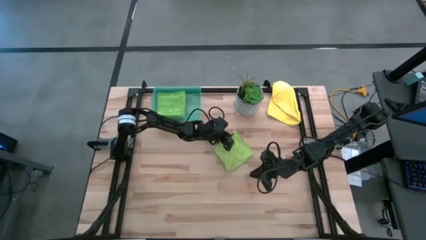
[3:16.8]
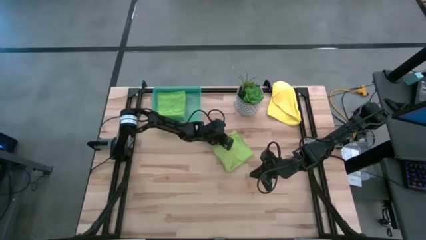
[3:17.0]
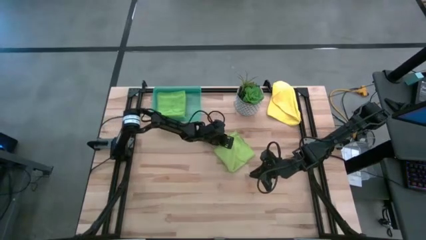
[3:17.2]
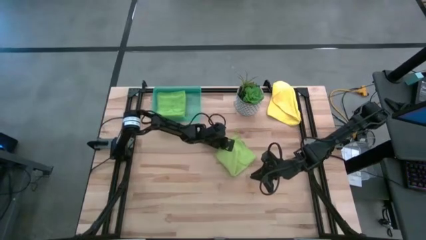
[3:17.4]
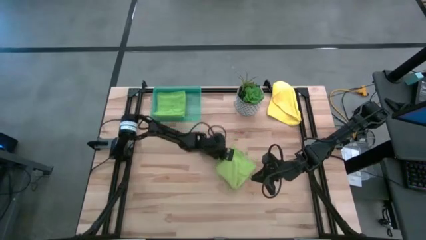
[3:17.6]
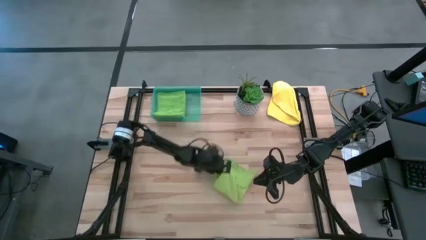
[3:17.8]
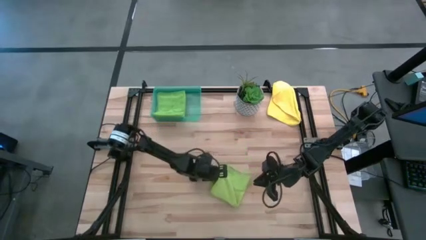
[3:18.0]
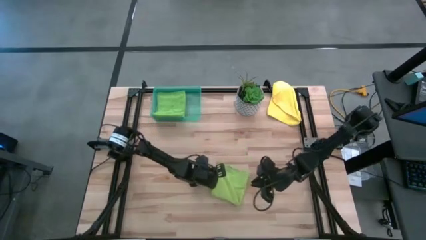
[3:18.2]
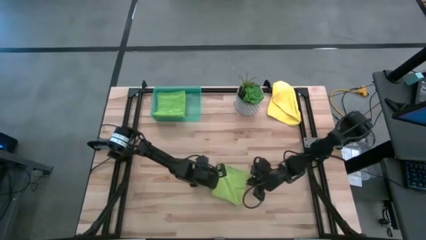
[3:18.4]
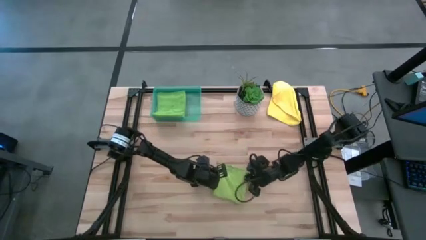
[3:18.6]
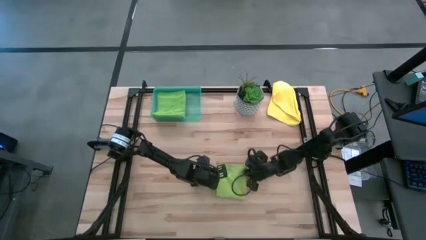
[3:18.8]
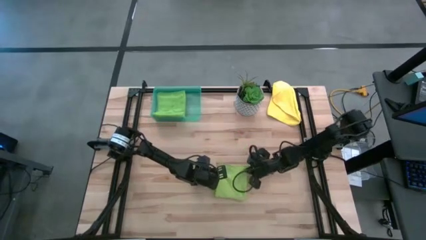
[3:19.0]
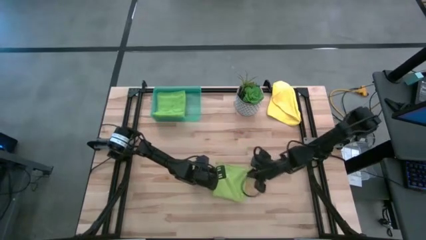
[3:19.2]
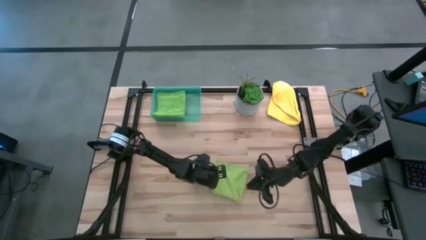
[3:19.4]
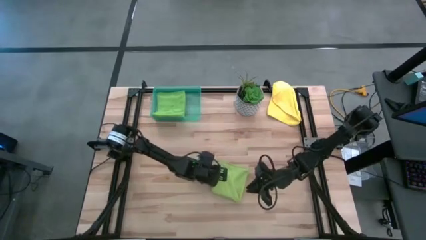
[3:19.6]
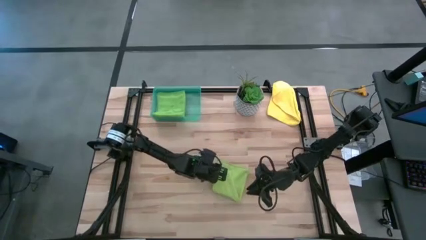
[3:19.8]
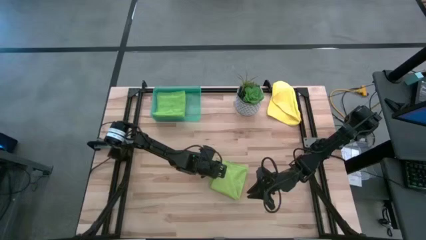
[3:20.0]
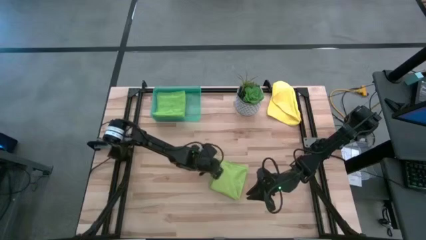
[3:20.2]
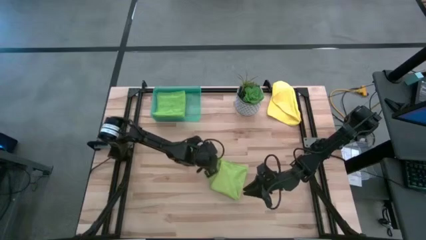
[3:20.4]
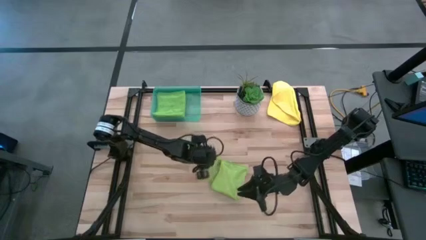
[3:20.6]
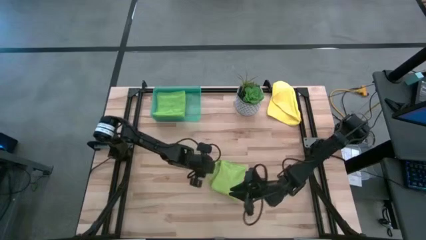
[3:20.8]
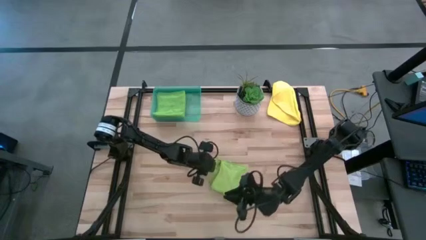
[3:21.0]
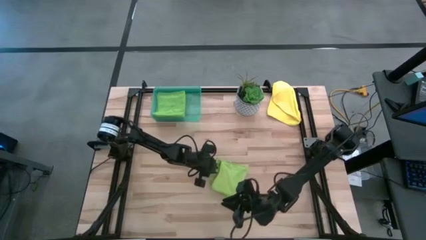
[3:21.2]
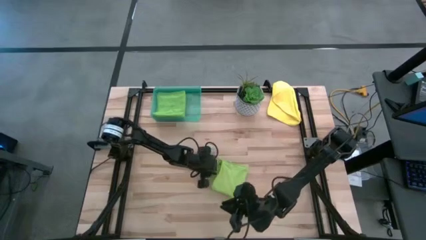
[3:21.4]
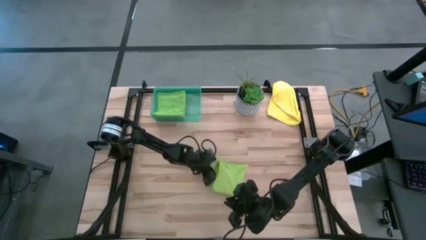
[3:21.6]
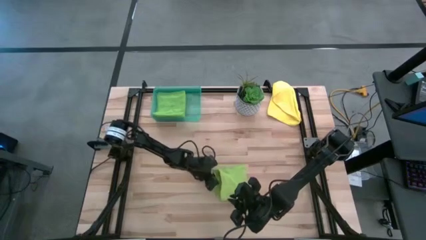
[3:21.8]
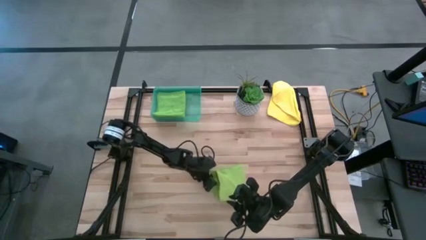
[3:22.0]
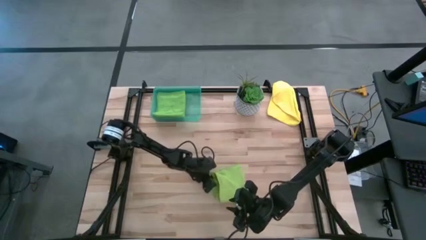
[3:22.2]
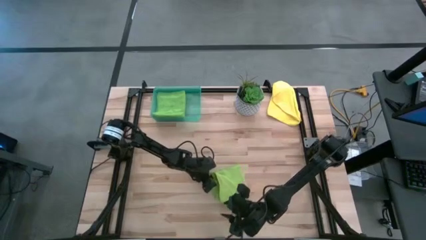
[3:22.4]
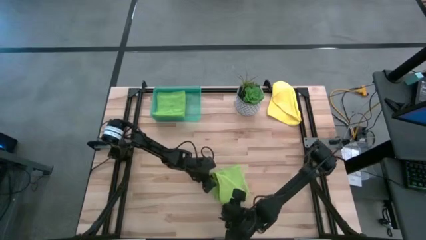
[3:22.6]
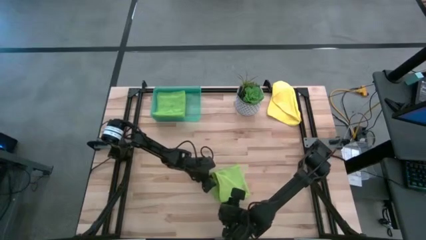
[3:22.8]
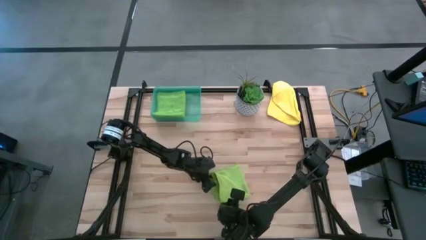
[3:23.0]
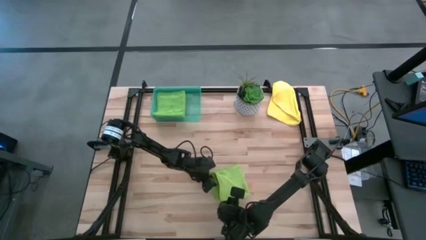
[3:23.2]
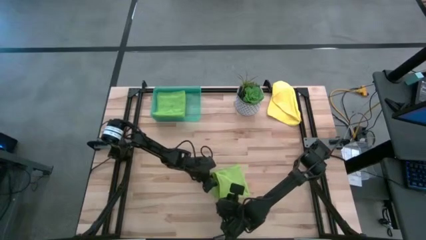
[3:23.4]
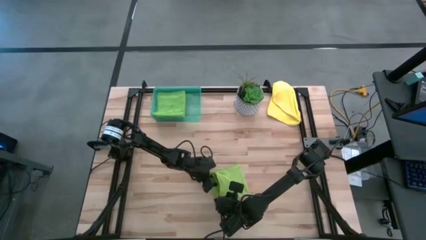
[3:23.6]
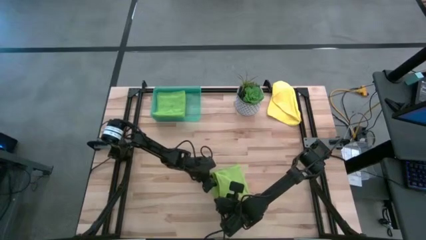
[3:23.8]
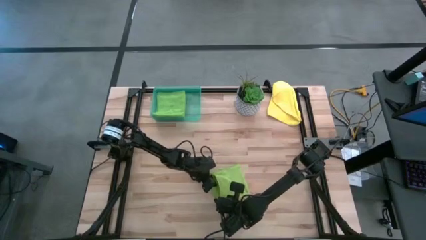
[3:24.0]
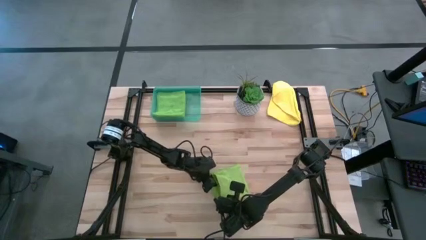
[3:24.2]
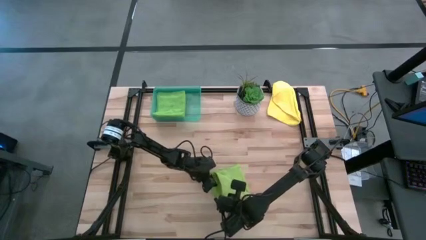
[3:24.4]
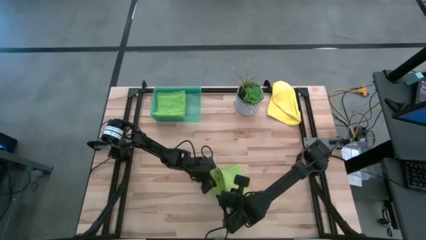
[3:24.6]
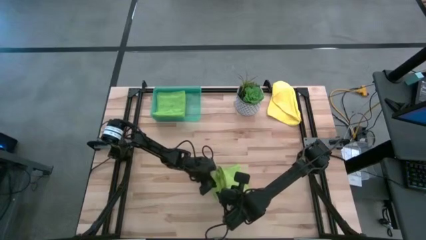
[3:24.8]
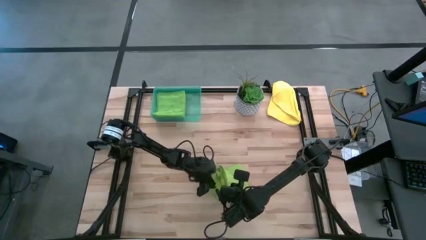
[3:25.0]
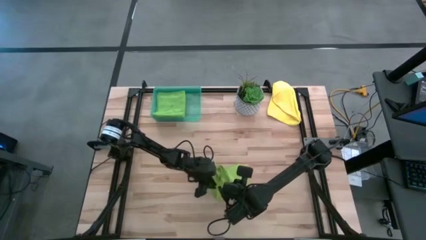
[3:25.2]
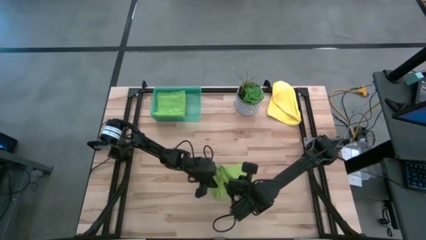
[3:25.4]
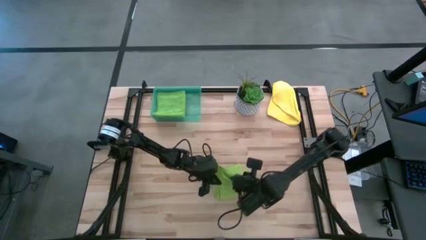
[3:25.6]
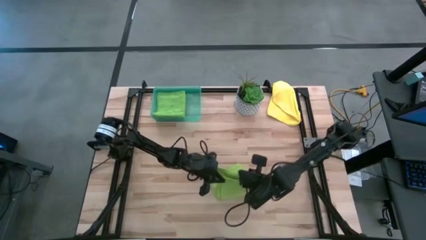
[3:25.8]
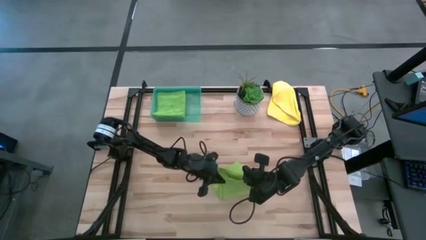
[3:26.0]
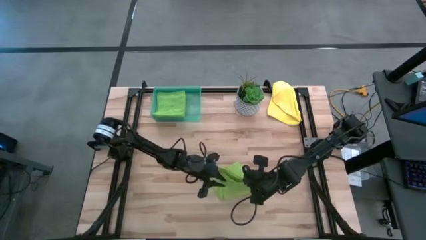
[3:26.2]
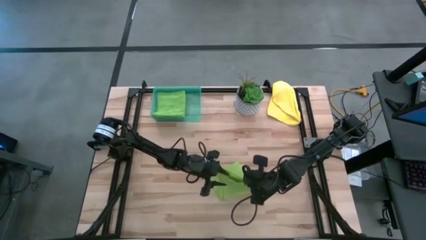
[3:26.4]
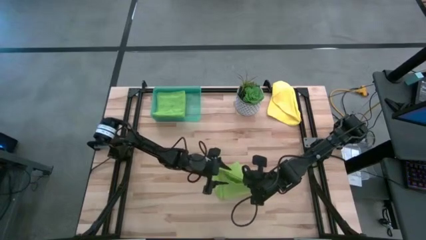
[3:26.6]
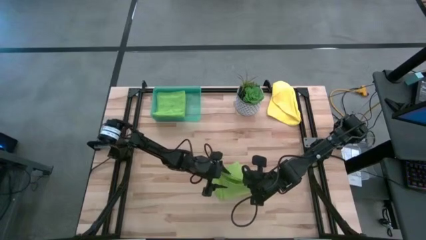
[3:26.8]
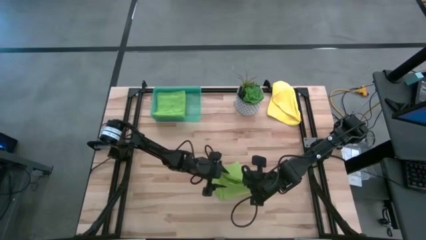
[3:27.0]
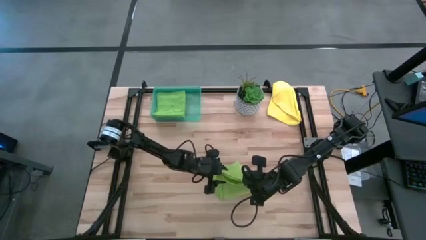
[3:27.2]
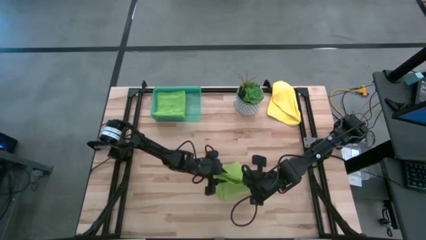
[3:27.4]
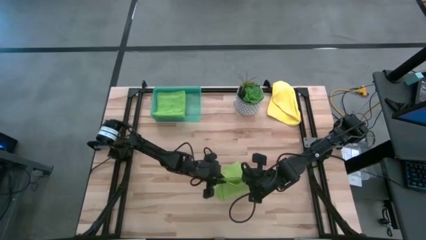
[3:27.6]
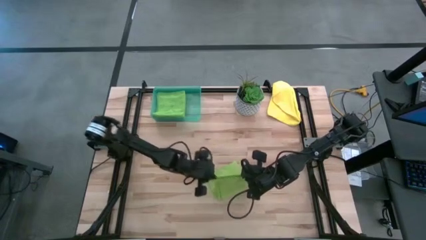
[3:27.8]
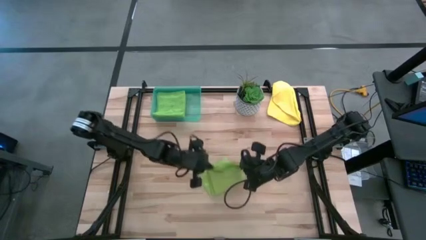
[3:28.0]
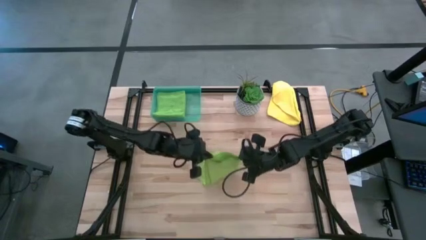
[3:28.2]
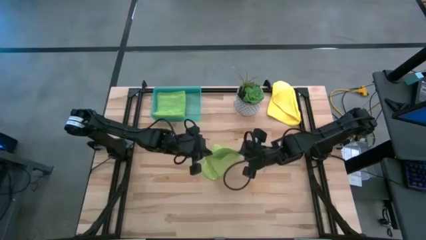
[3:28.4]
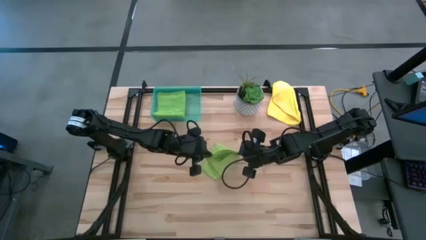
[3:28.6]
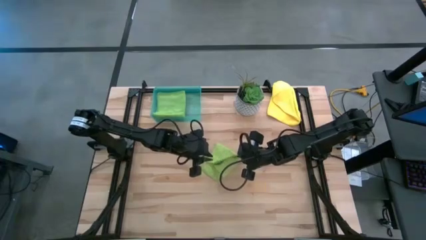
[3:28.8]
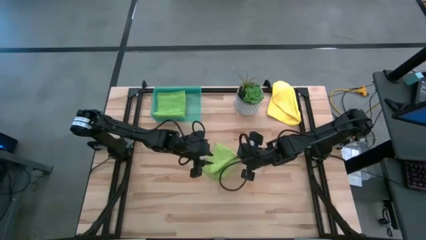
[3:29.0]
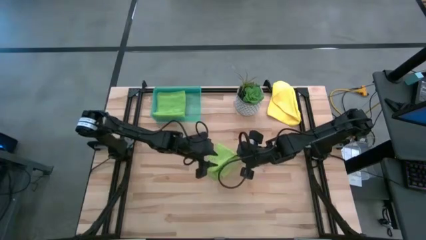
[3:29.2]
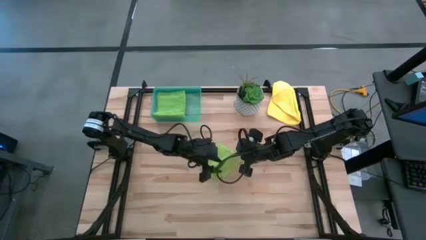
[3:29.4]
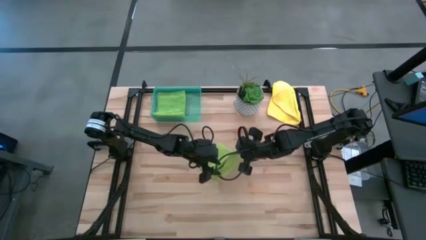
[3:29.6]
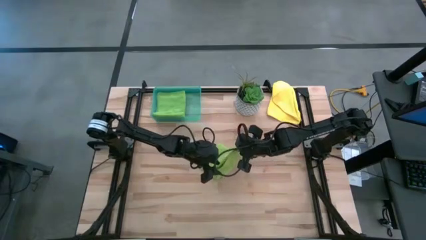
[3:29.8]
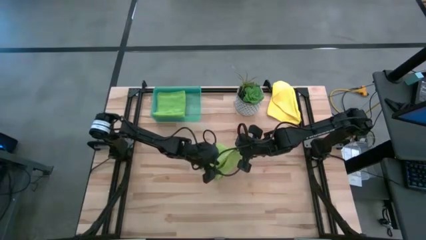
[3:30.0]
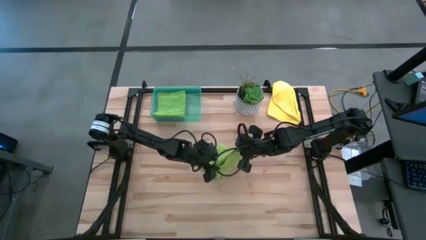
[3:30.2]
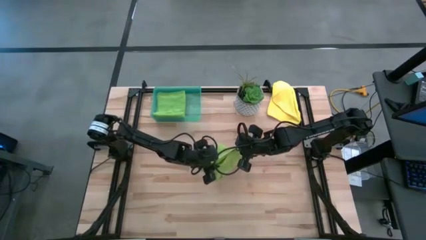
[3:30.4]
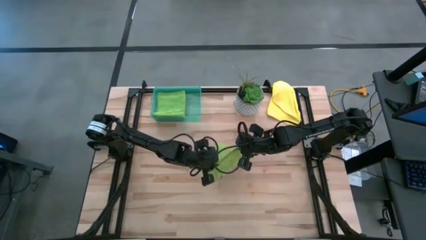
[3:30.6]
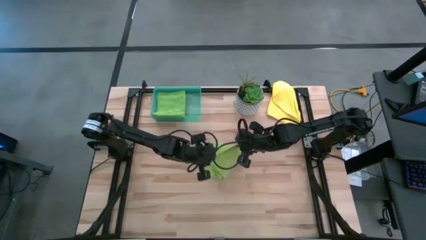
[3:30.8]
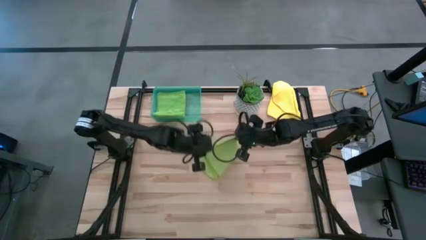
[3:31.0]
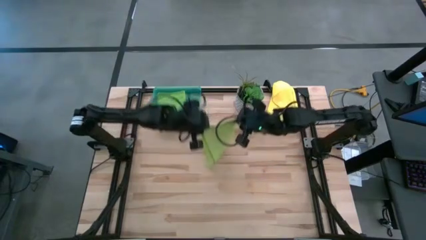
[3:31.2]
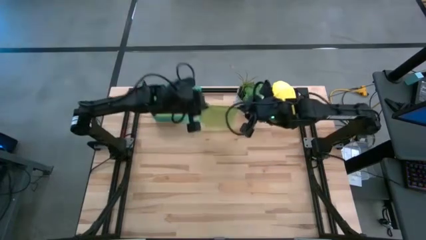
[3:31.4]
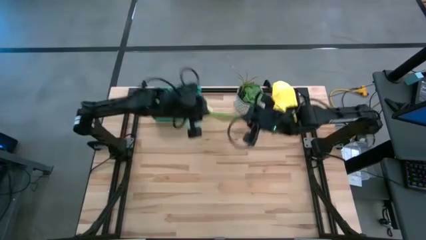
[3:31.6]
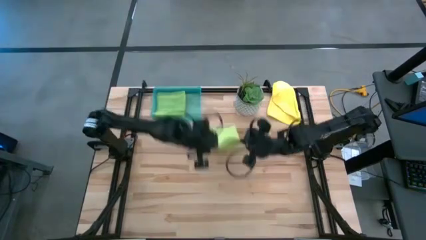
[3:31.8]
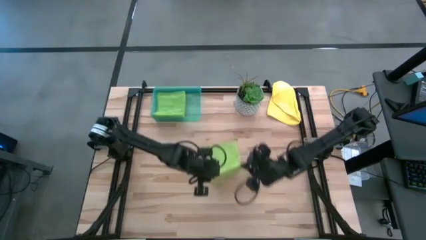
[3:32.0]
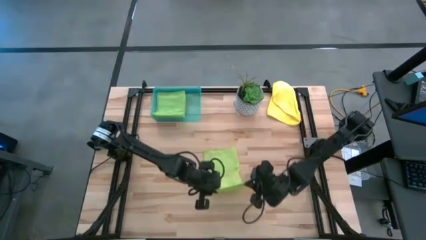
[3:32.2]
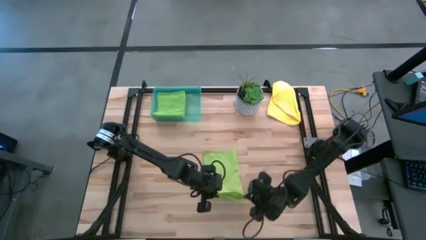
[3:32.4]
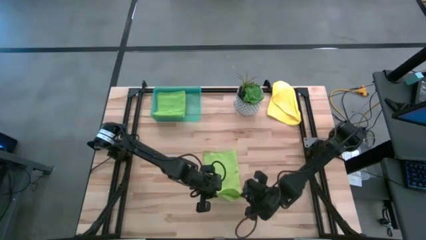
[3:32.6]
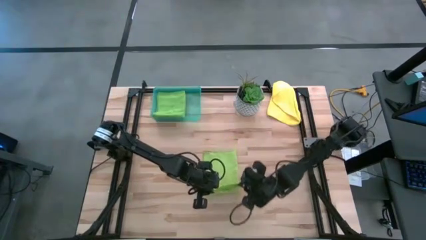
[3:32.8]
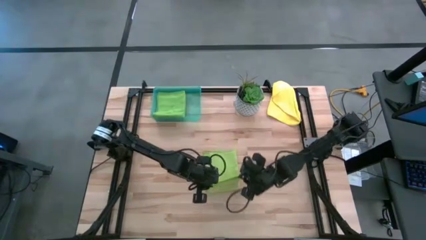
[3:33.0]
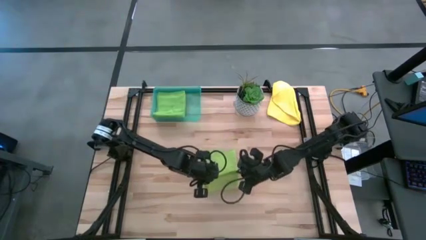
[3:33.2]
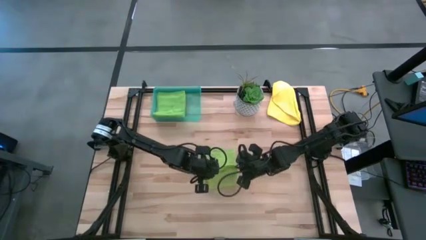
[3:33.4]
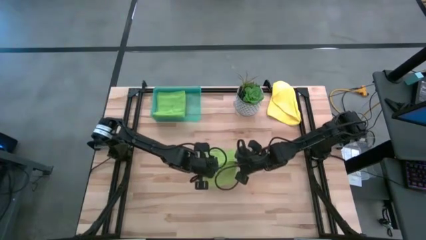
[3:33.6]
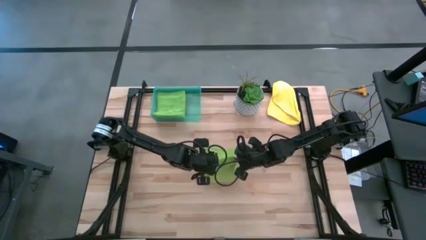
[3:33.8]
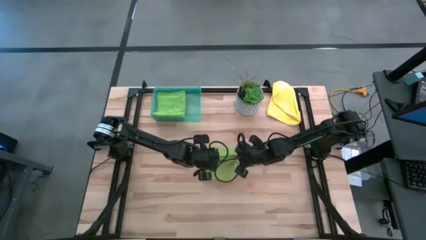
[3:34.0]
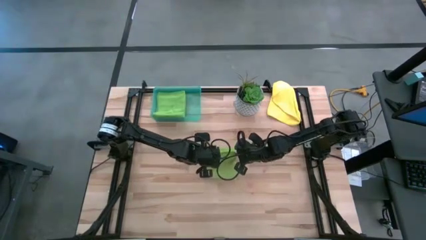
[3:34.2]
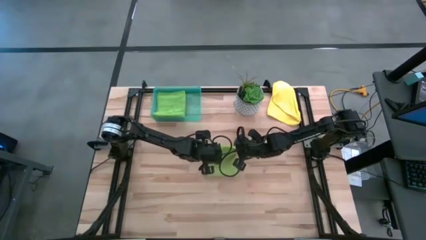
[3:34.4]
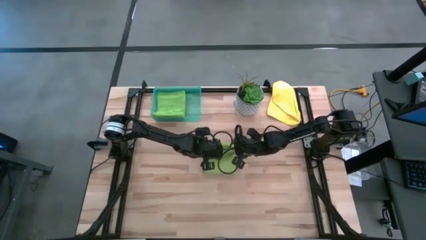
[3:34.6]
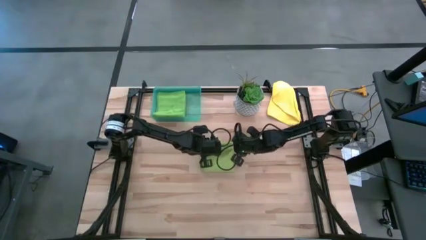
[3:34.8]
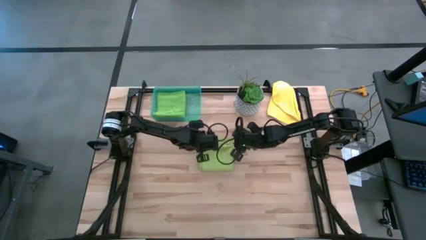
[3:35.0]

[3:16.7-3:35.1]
Task: Fold microfiber towels
Fold the yellow-green microfiber cloth
